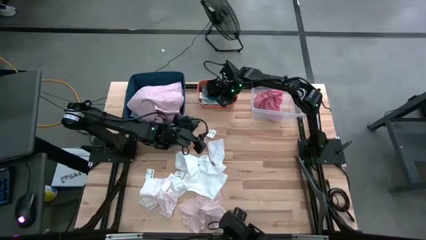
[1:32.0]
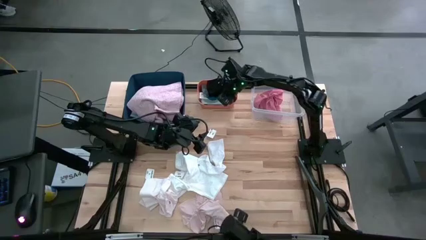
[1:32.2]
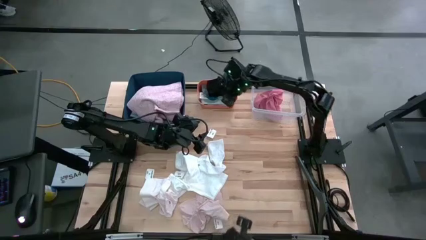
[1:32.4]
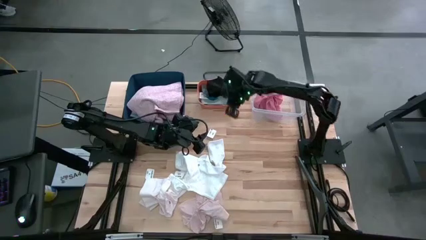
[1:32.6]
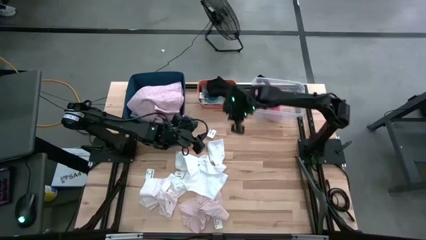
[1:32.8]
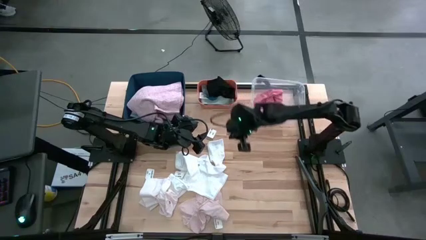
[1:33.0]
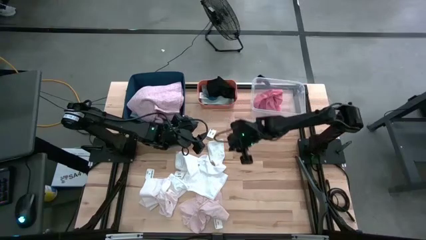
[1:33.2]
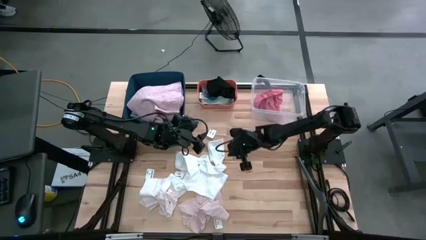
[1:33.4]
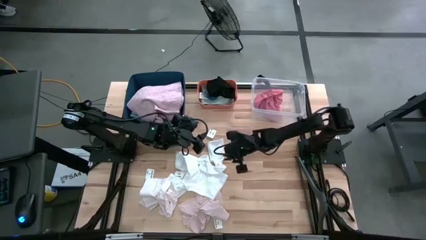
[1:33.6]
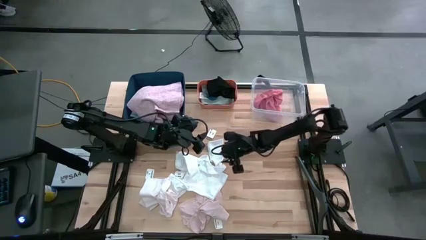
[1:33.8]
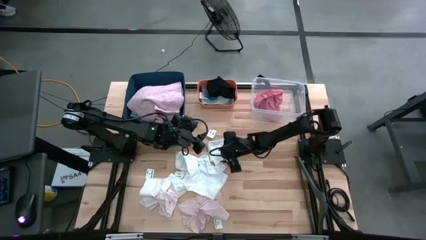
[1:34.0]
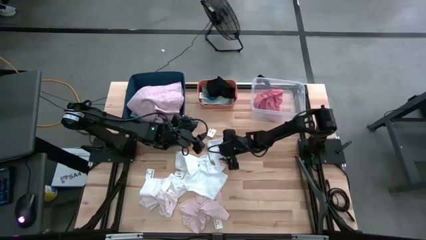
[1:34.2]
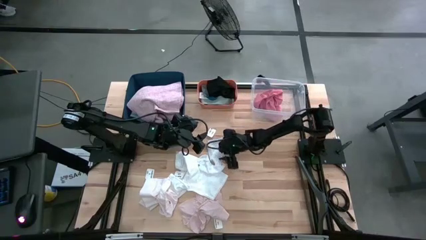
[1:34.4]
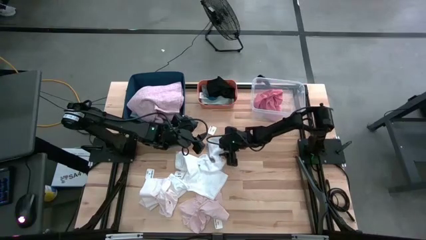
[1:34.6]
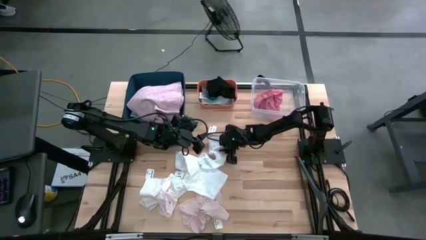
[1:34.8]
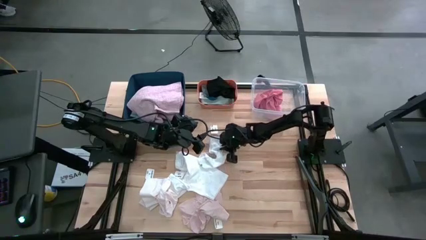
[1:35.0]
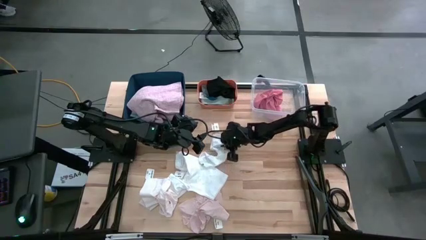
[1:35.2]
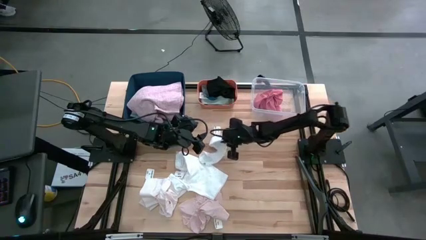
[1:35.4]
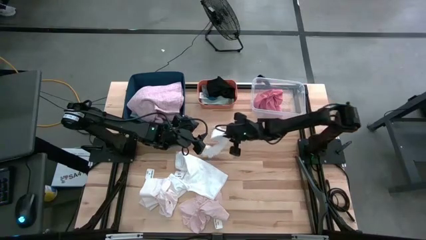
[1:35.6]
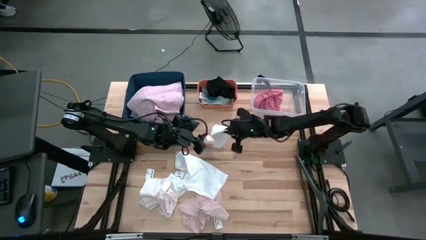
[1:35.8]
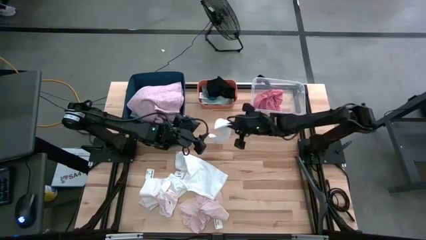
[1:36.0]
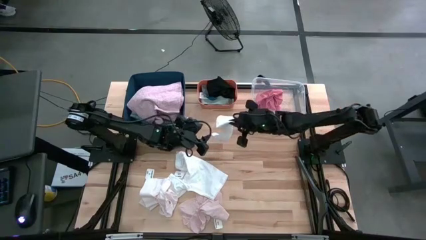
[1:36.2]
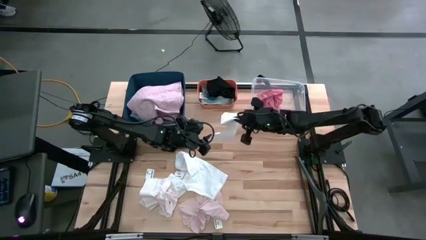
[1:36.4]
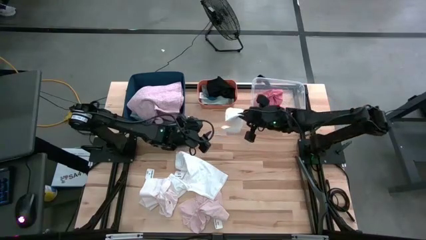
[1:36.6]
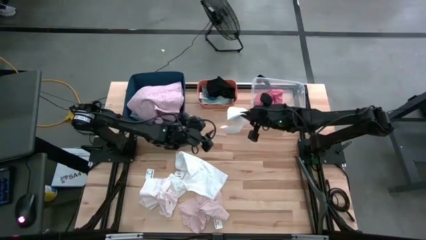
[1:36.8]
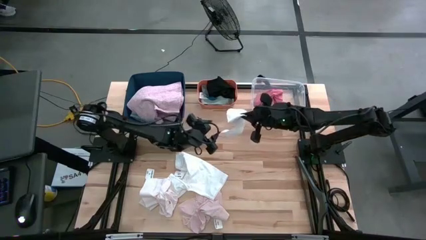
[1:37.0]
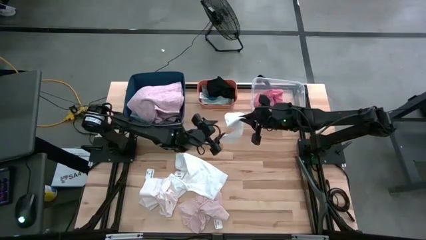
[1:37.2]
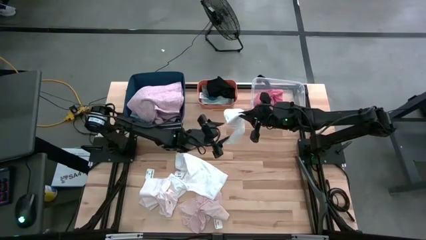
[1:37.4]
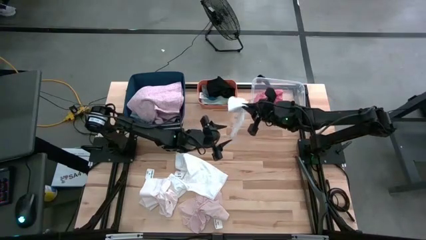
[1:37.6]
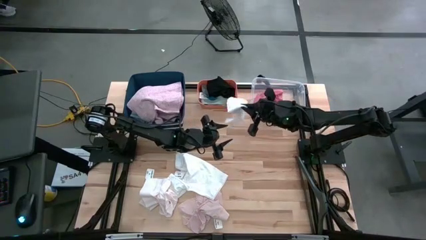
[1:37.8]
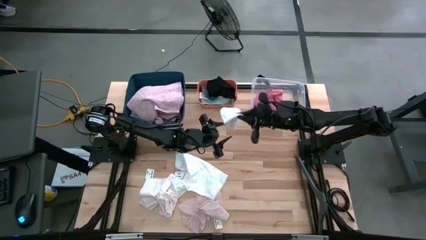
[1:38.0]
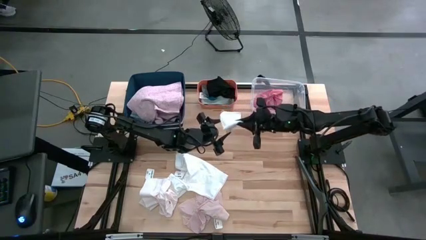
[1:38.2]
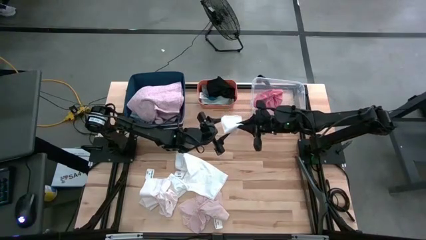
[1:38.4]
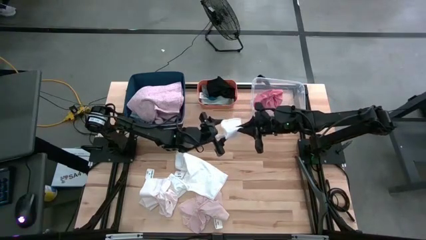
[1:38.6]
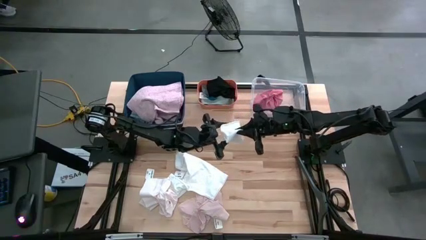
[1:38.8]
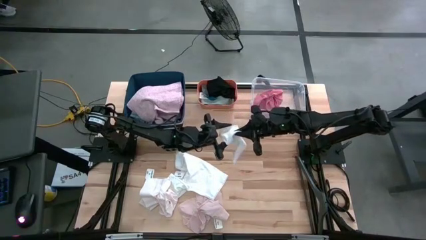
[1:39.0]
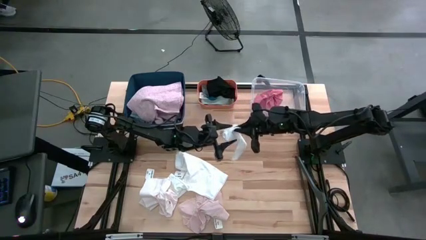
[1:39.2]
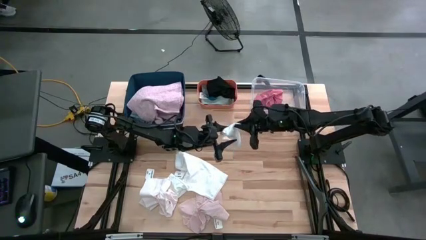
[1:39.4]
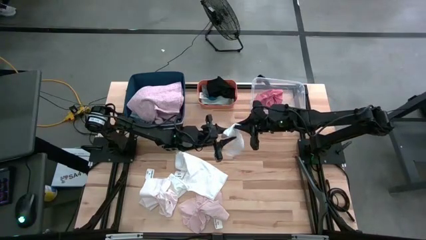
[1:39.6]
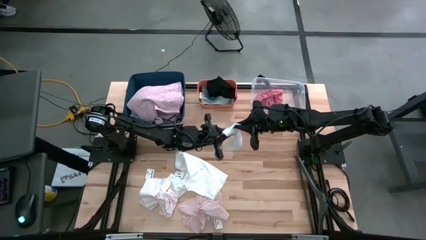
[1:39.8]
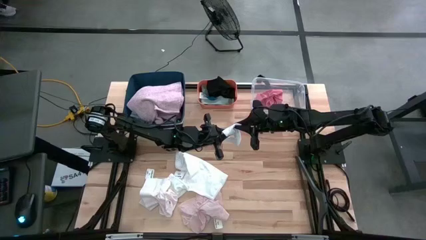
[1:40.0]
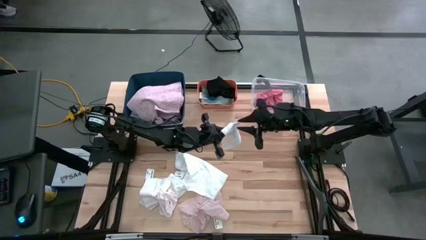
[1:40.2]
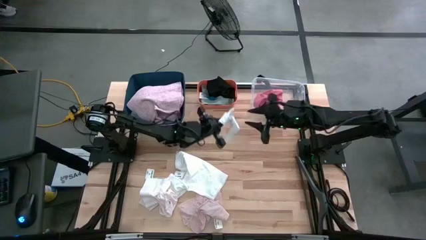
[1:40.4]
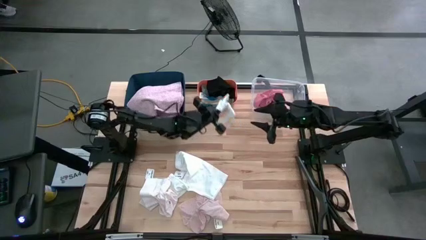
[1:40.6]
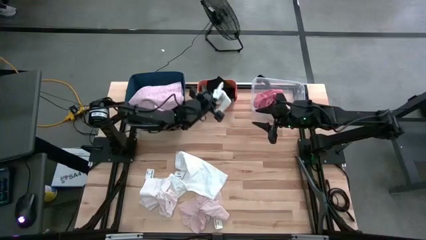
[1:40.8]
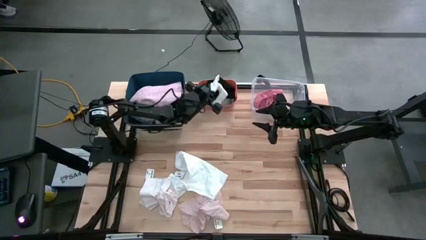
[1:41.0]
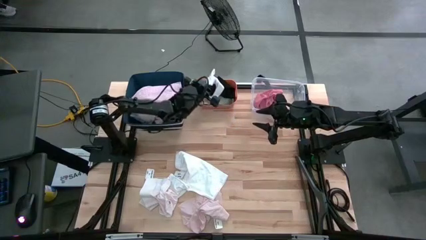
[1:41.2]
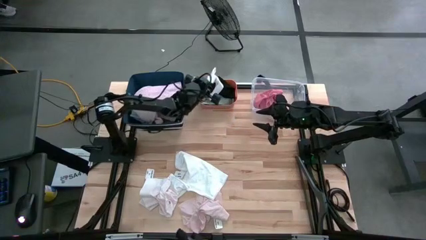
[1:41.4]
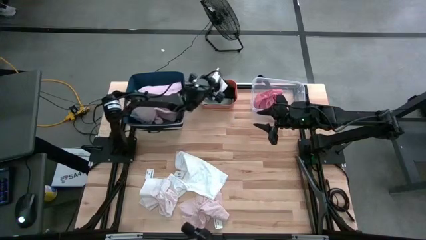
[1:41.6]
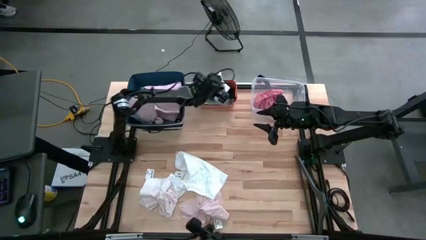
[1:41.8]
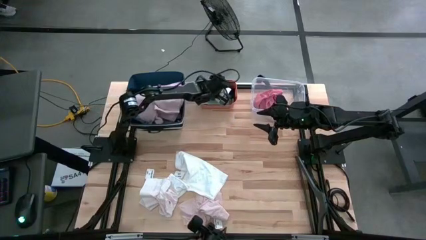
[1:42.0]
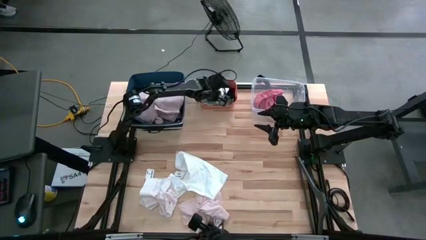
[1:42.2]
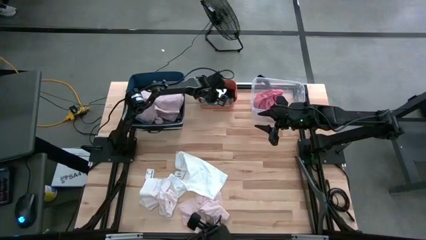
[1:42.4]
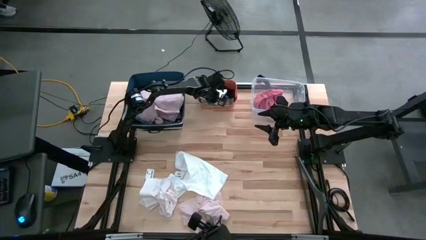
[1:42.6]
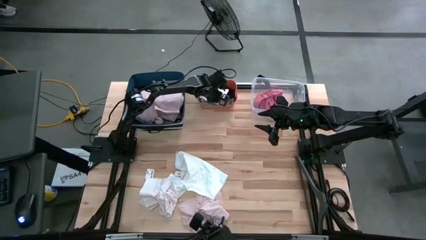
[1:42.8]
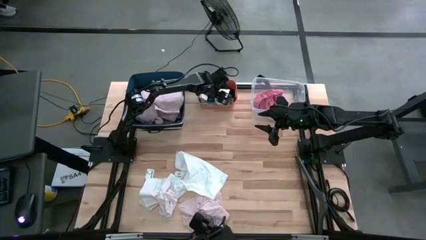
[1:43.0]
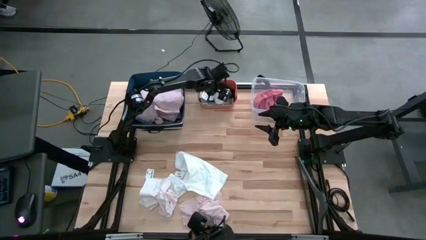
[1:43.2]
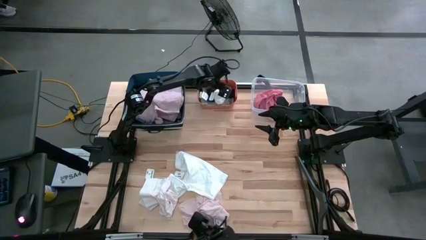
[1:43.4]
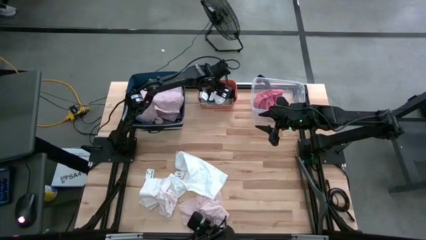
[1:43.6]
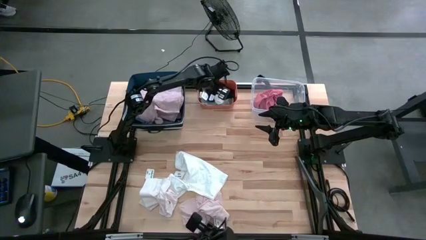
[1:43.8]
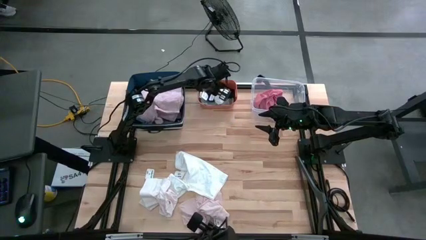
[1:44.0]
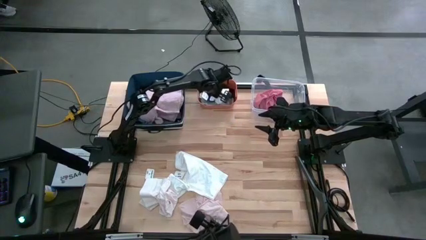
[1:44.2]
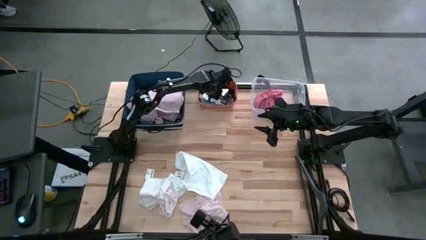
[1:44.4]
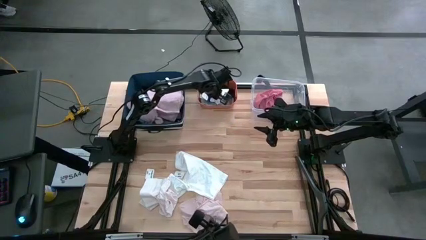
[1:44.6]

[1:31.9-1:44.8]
Task: Pick & Place Cloths
Put the white sock into the orange bin

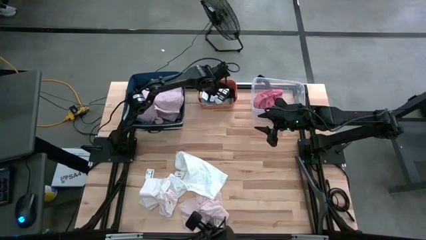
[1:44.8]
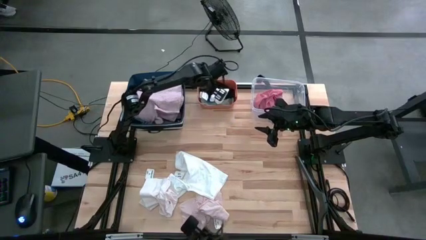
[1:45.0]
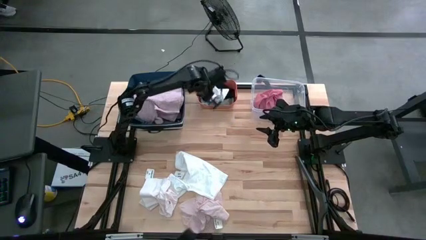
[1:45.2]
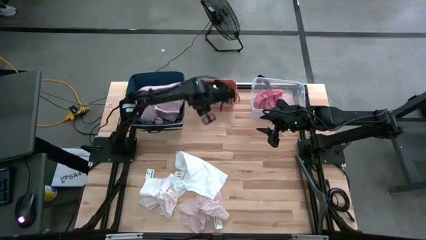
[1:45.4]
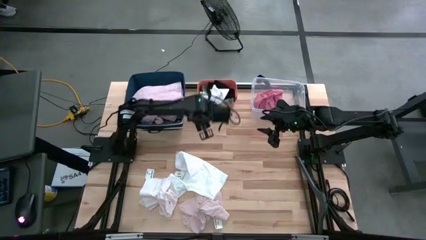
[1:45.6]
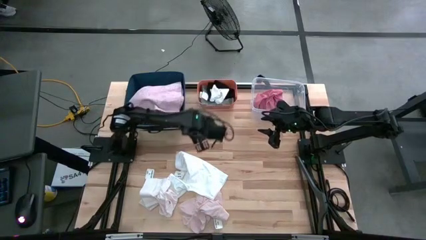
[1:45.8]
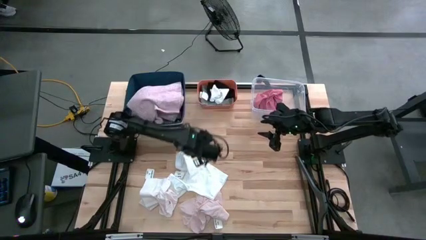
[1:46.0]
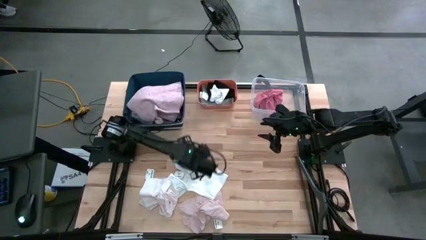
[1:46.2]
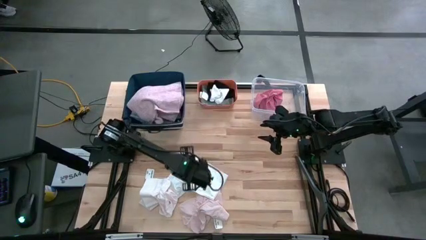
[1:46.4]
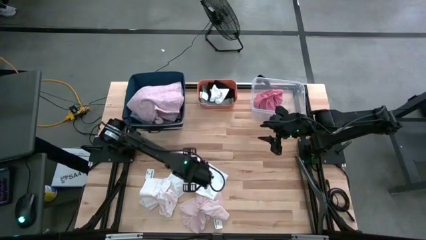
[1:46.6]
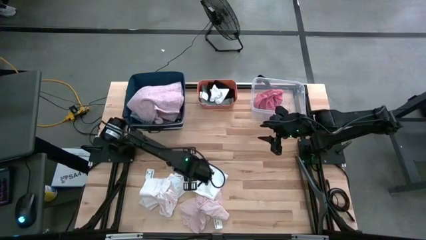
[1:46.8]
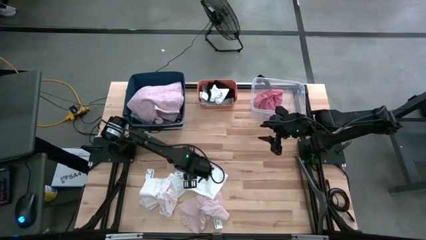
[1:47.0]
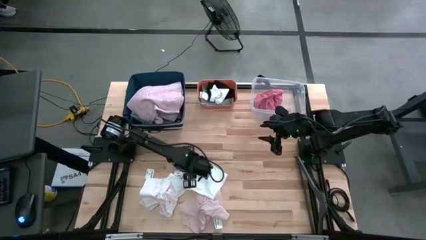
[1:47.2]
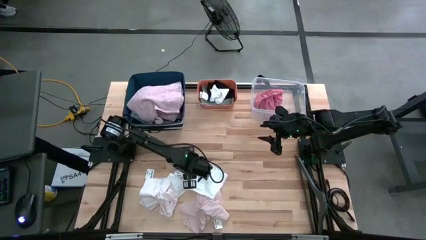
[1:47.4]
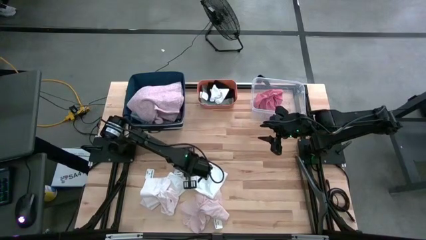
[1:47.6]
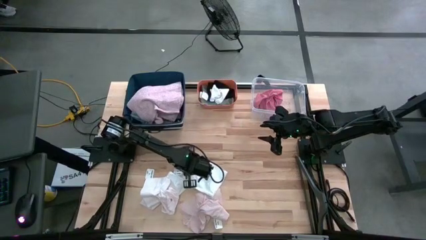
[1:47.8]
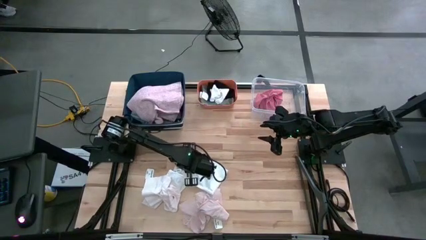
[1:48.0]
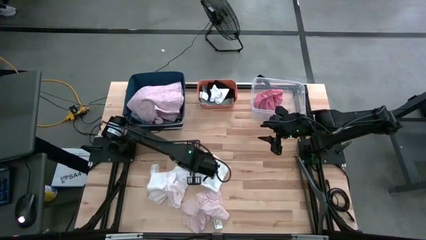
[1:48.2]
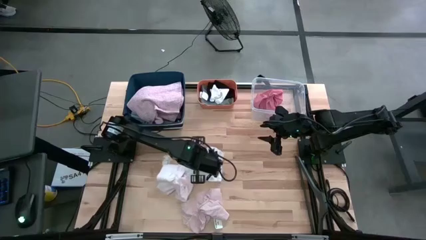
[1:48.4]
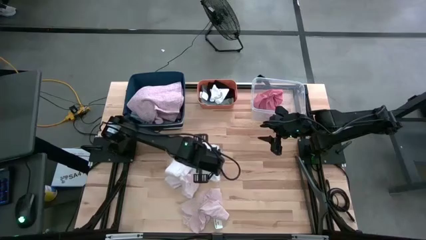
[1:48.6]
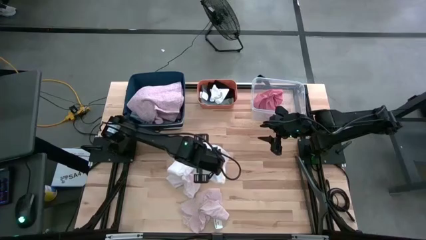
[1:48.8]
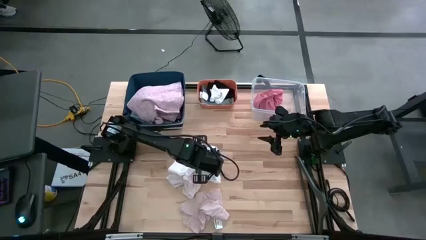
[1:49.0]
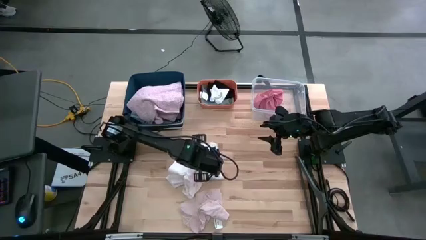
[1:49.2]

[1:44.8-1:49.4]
Adjust the white underwear on the table
